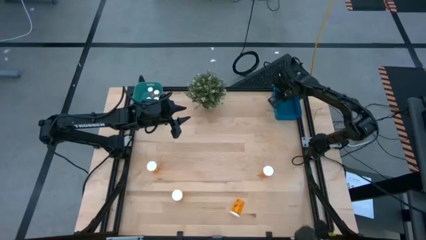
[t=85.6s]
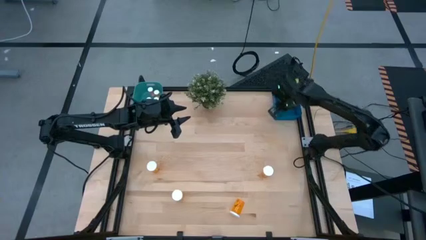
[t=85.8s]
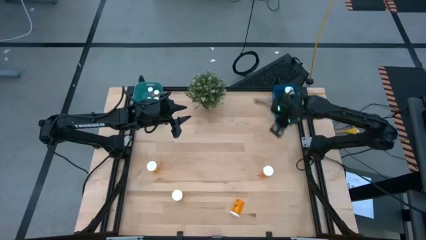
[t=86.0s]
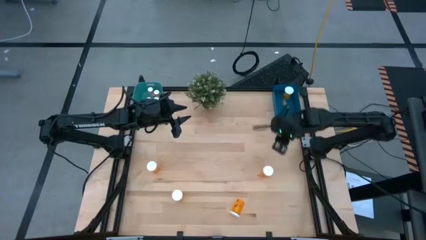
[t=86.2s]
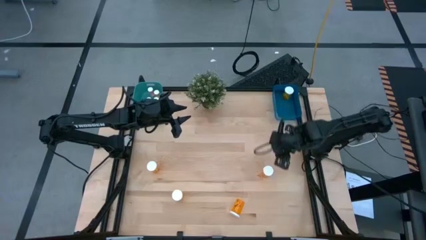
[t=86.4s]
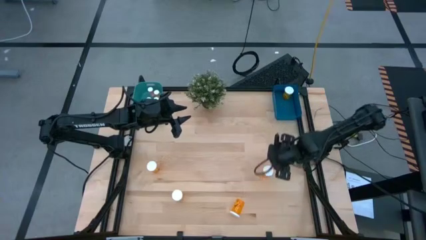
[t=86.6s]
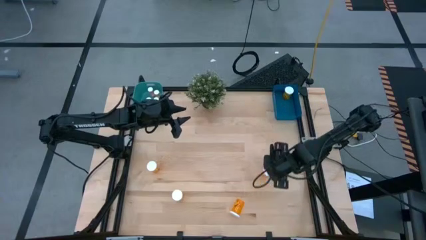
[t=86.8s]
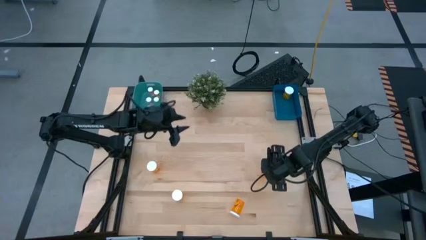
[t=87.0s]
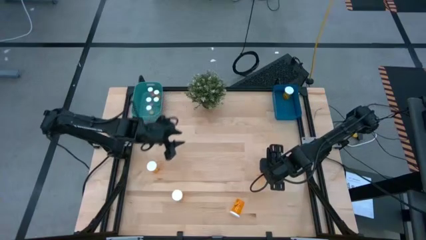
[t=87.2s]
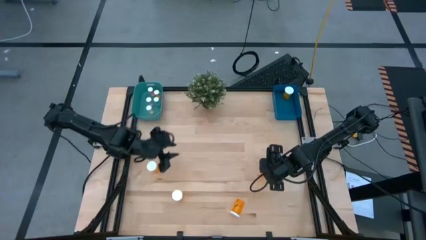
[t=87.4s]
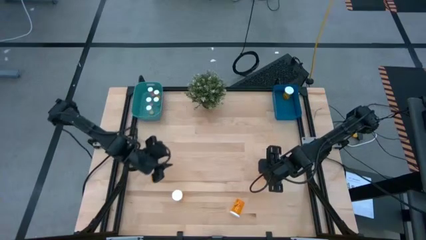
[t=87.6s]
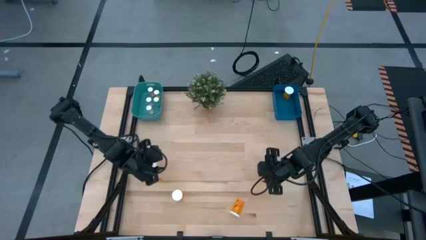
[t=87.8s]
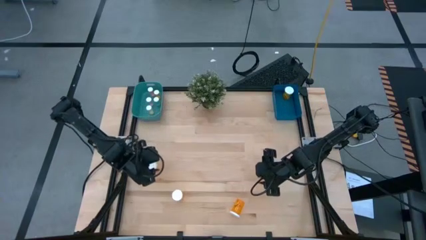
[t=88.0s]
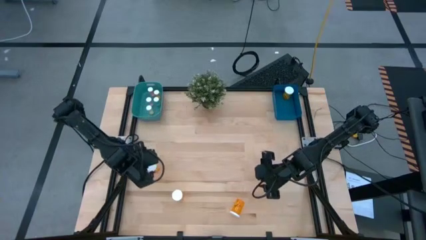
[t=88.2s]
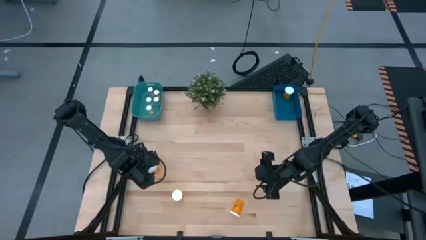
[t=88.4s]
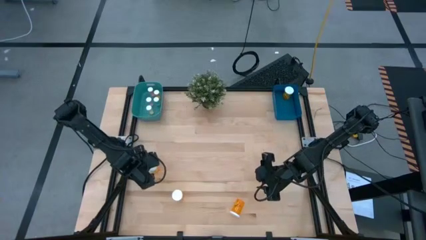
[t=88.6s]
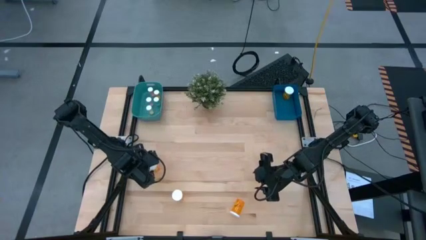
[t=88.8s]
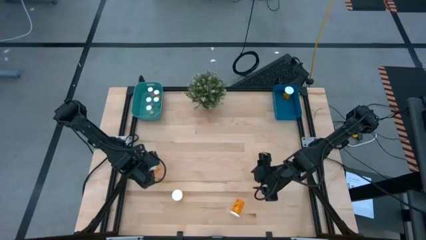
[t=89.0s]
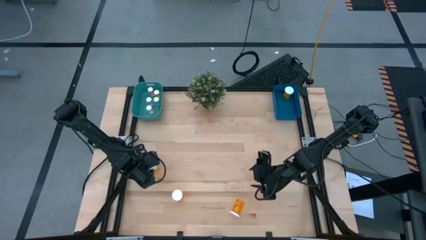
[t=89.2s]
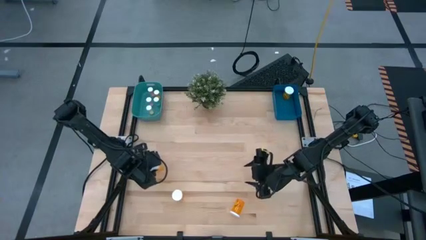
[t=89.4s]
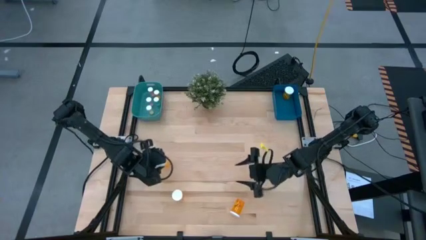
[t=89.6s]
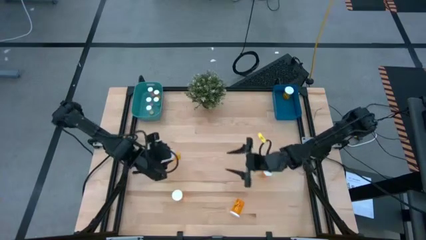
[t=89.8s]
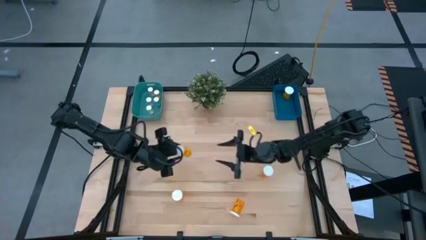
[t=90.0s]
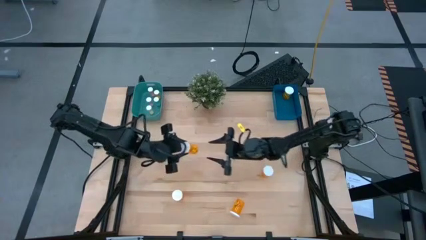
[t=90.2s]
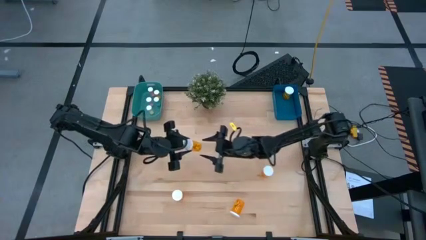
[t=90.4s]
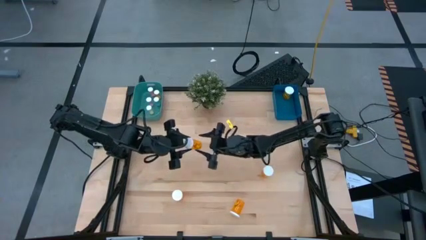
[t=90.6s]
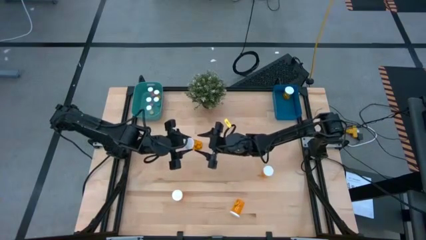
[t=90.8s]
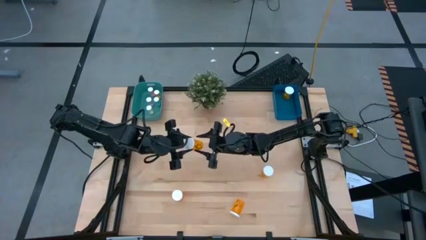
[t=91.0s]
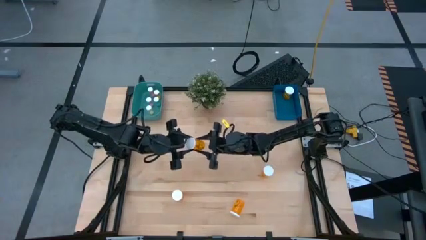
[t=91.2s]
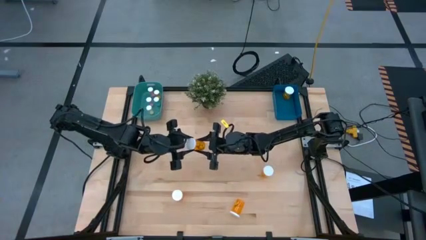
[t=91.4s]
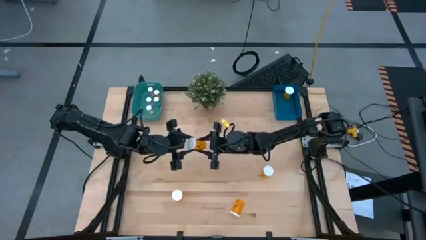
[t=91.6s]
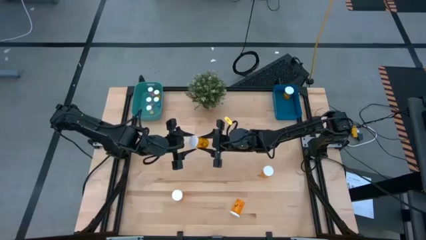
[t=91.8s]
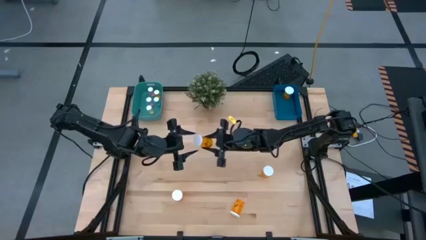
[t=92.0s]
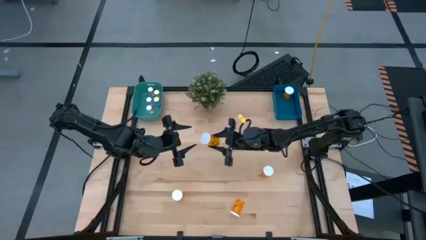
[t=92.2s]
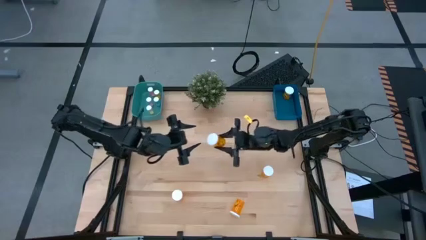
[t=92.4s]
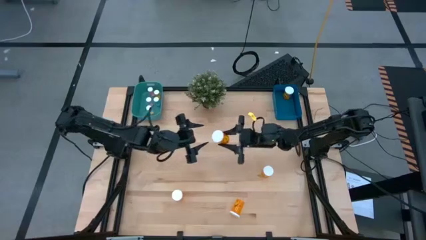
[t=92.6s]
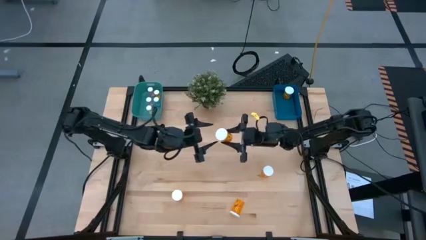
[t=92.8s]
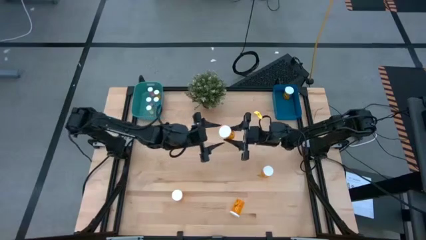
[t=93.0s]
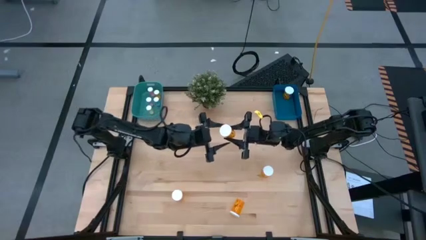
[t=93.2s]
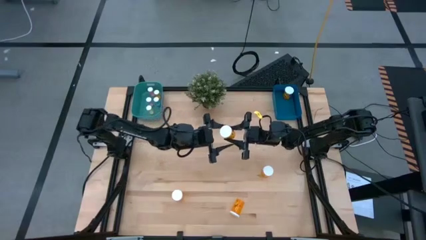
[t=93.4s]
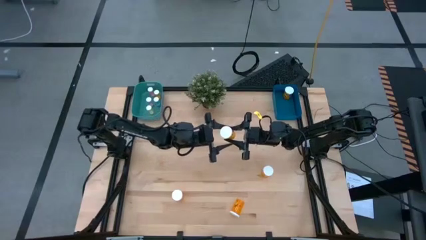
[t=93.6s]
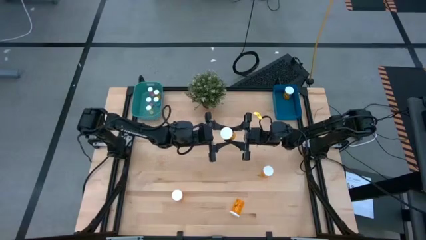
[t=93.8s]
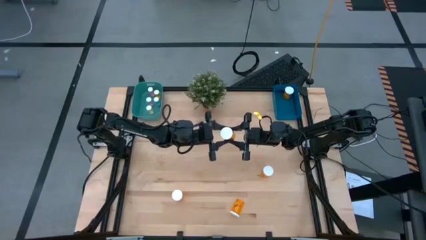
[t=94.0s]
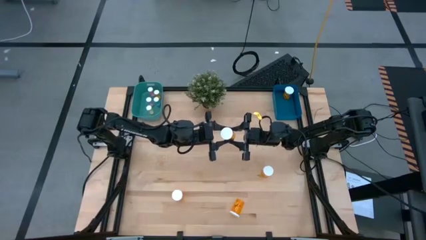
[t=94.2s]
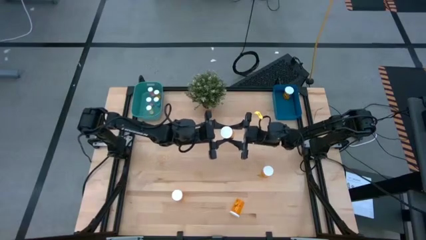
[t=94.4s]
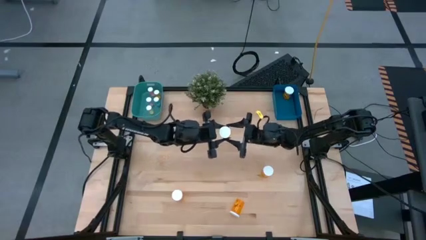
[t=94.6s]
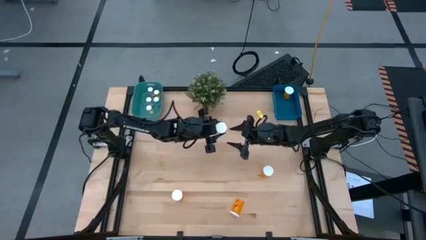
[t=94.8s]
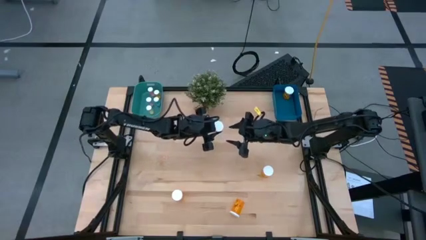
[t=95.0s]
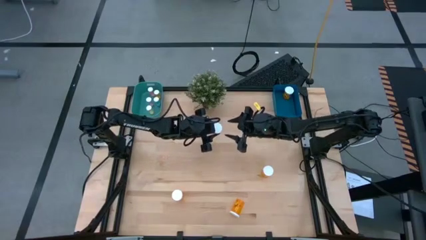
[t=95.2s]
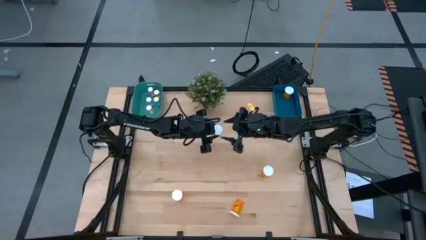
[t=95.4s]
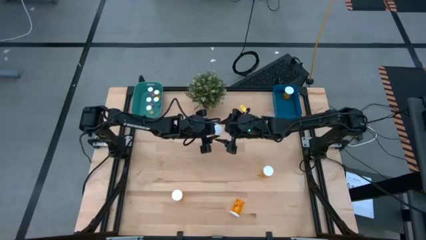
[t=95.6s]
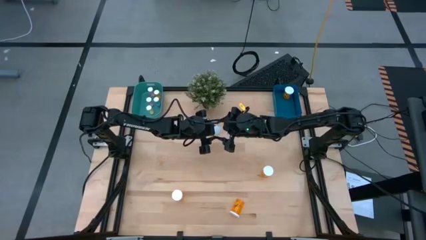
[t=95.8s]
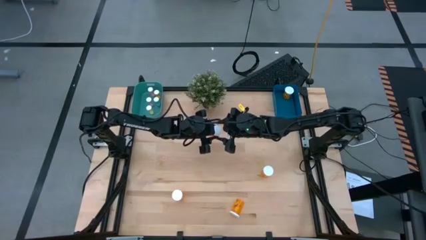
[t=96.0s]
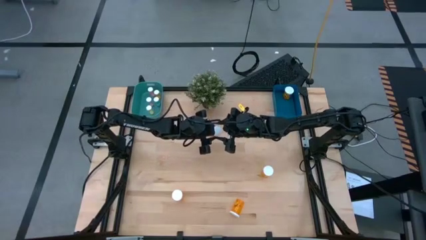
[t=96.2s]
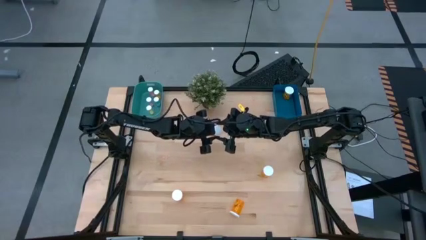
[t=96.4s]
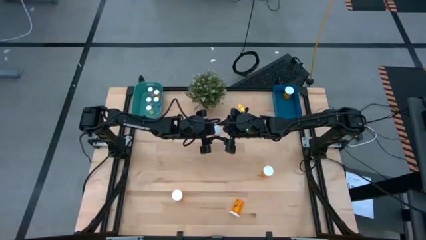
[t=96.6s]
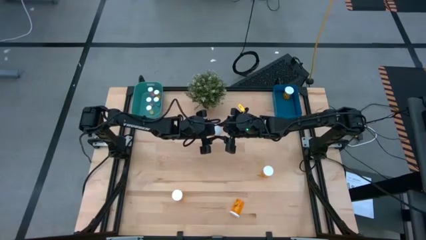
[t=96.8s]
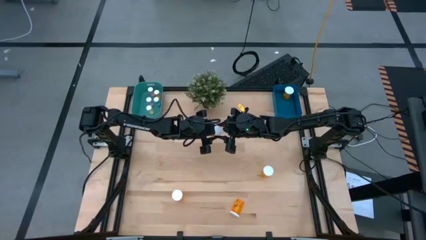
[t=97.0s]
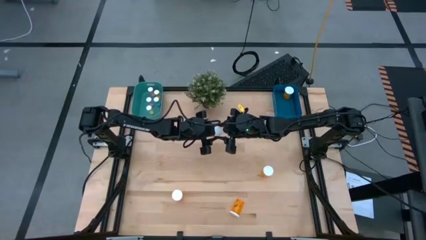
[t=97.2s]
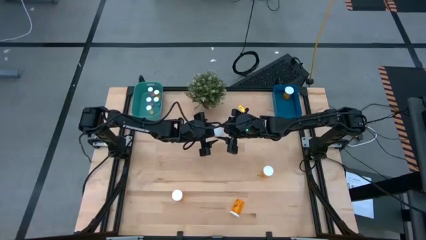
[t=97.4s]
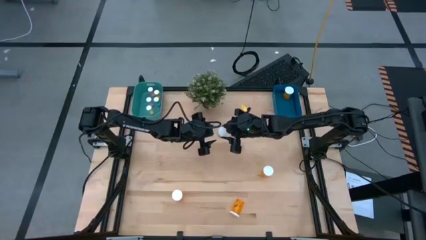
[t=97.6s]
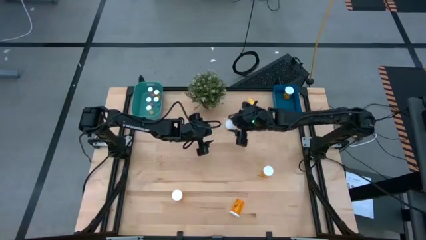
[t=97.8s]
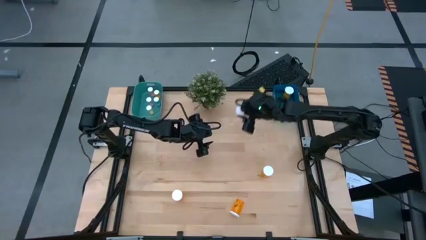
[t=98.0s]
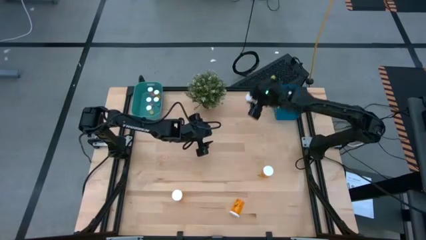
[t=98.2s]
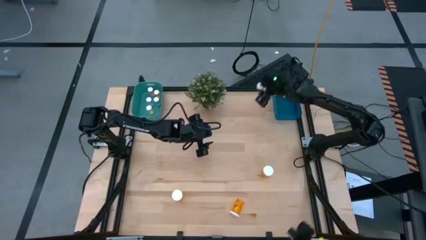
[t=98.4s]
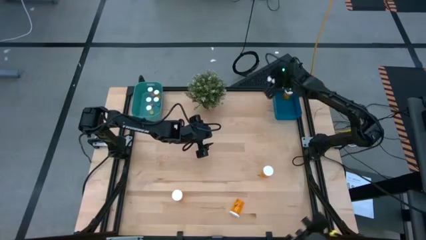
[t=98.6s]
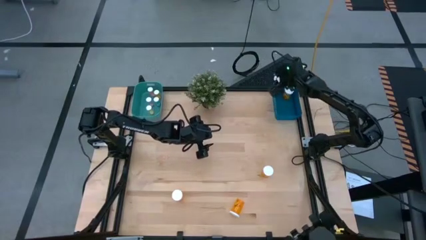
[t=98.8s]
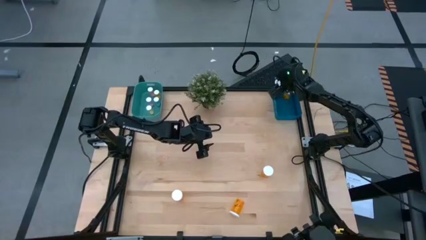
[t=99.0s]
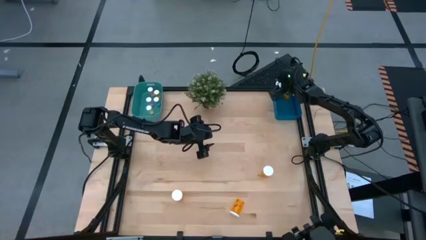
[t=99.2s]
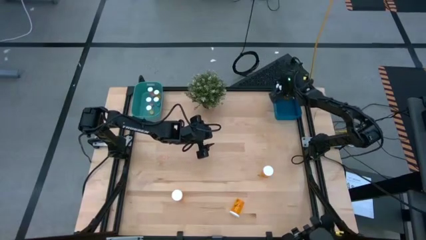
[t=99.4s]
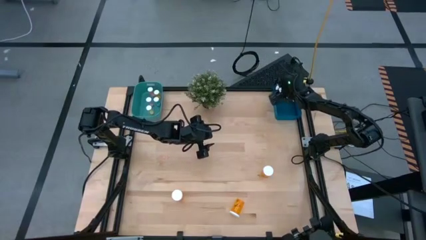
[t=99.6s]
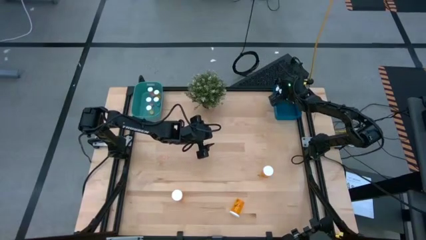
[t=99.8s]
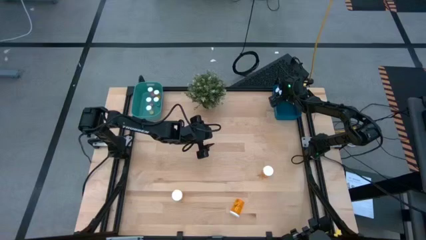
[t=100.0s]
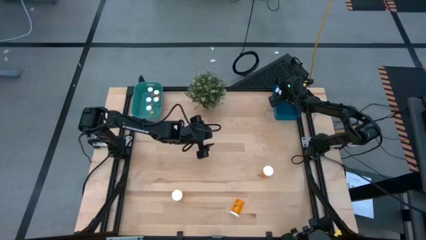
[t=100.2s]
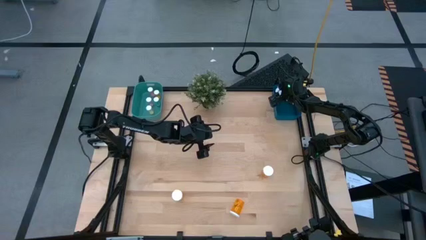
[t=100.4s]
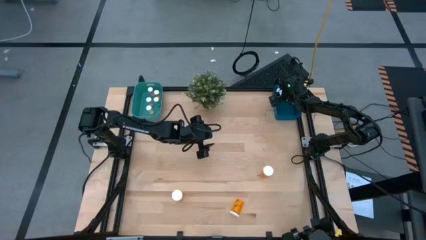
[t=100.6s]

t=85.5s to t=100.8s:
Task: Pick and place medicine bottles into bin by pill shape (circle, oval)
Put the big orange pill bottle into the blue bin

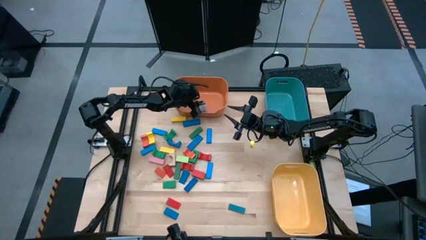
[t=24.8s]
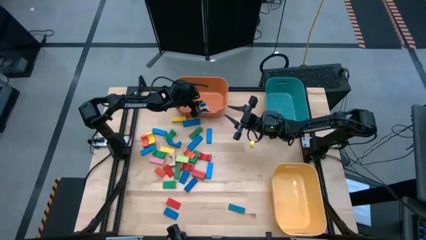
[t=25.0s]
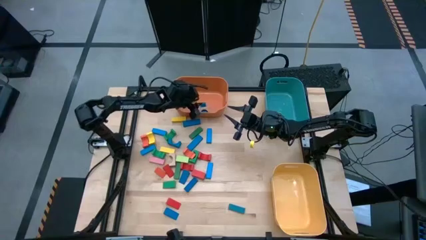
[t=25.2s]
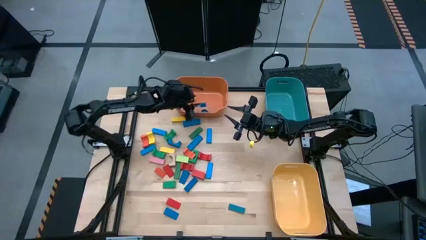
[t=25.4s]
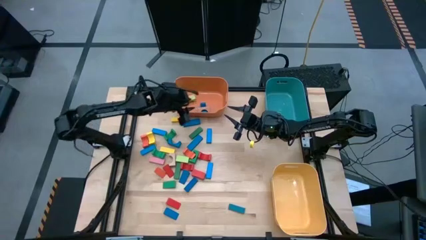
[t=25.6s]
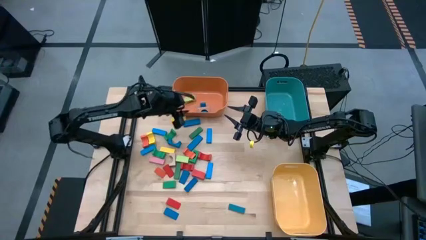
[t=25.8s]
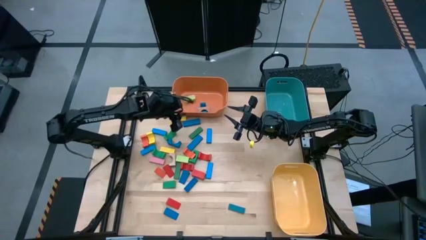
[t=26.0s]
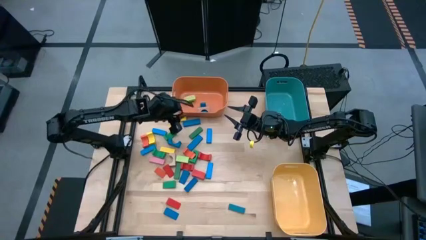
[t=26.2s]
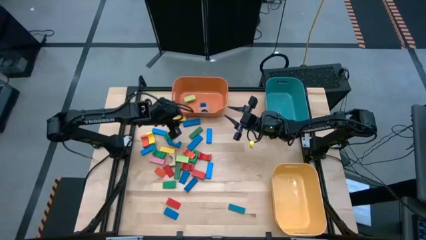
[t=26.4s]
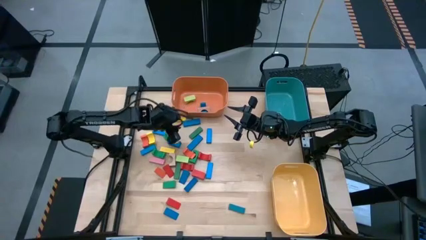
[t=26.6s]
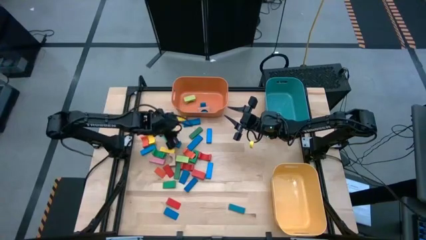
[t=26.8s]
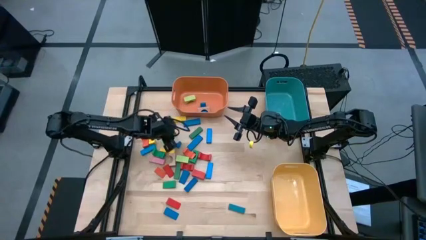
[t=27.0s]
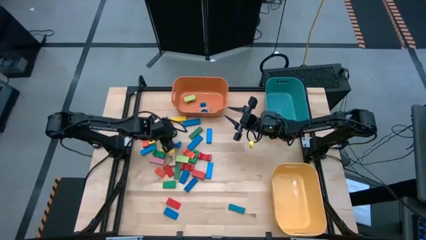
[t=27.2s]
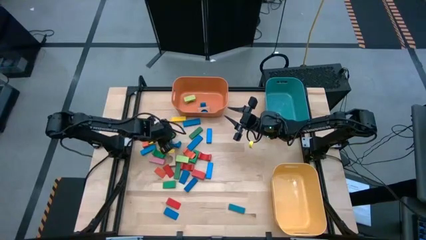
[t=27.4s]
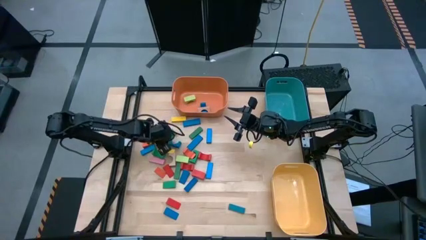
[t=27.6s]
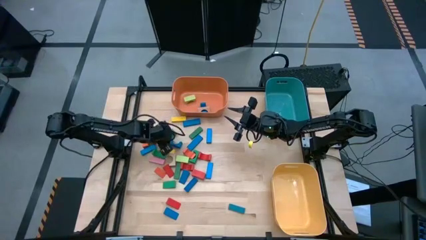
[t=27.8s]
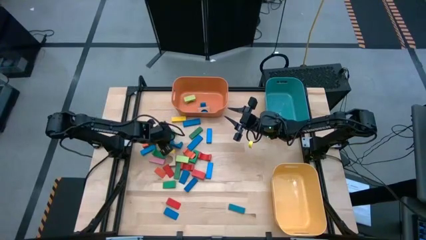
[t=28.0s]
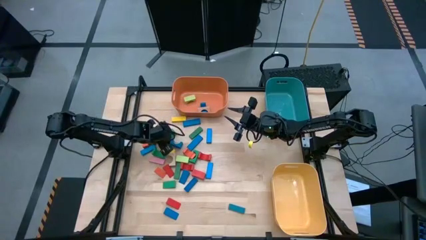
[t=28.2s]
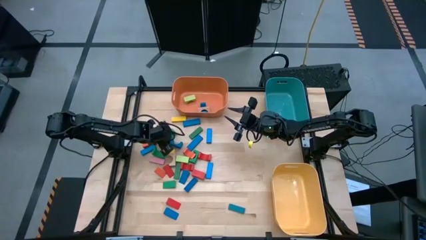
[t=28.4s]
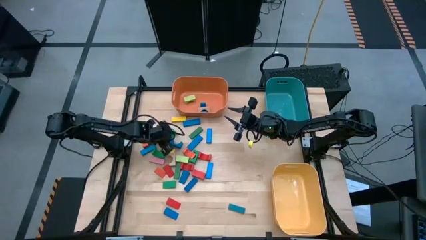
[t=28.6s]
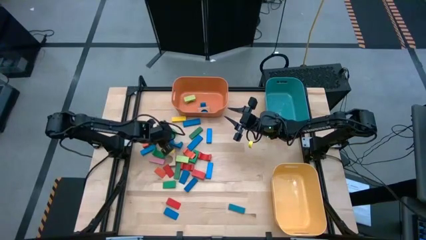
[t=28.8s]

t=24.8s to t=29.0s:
Task: Sort blocks by size
Put the green arch block into the orange bin
